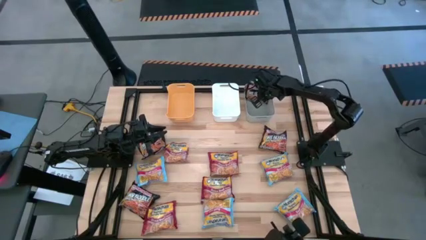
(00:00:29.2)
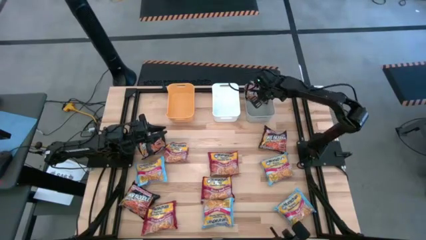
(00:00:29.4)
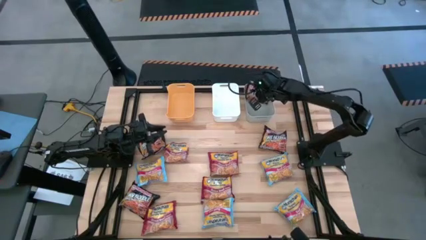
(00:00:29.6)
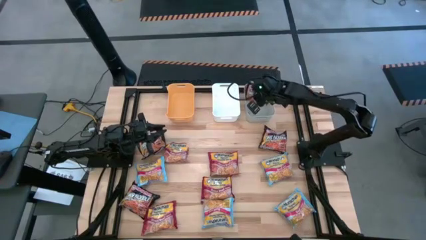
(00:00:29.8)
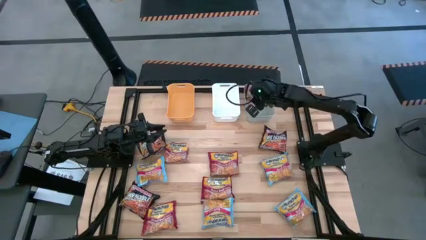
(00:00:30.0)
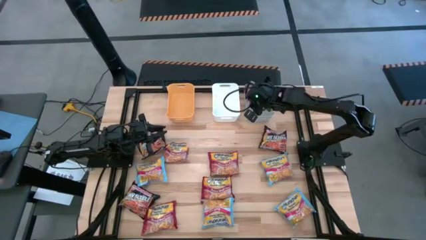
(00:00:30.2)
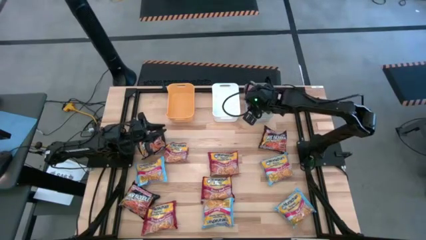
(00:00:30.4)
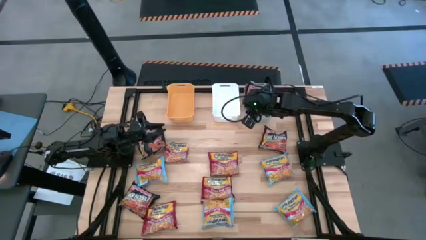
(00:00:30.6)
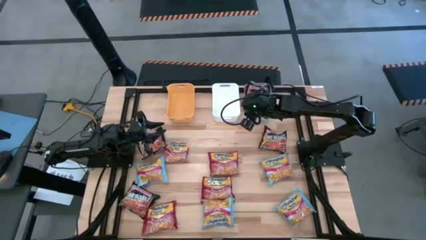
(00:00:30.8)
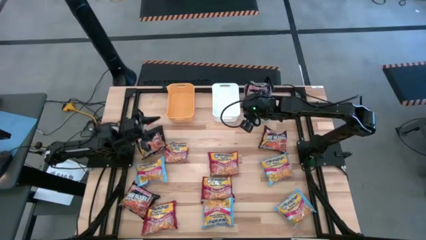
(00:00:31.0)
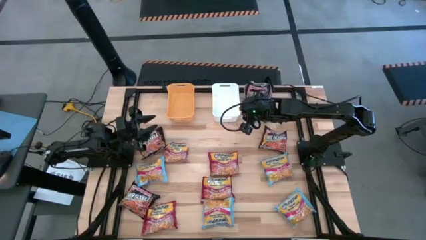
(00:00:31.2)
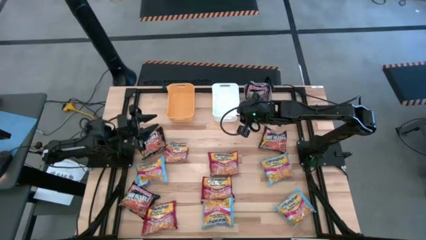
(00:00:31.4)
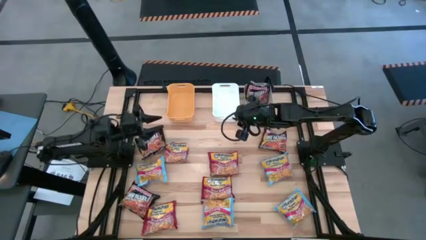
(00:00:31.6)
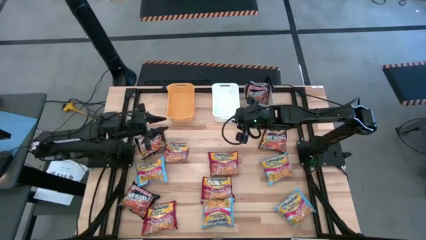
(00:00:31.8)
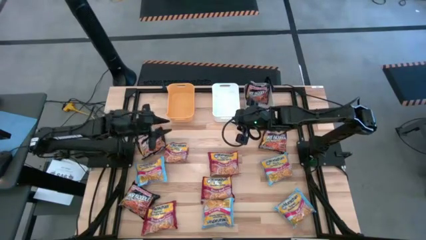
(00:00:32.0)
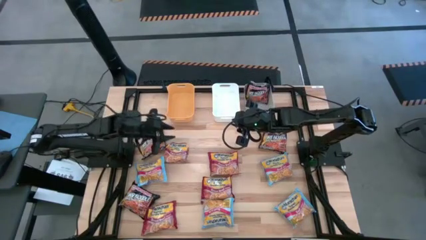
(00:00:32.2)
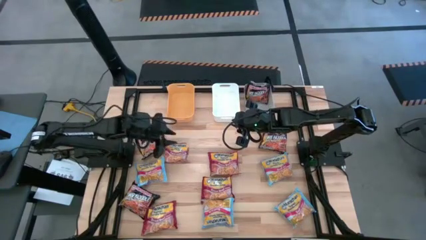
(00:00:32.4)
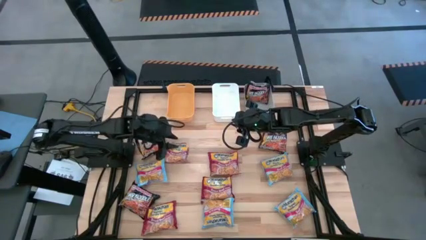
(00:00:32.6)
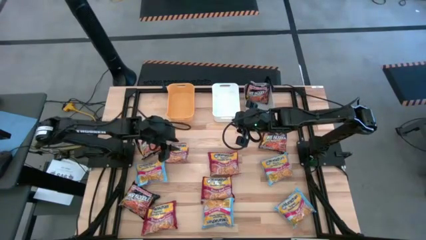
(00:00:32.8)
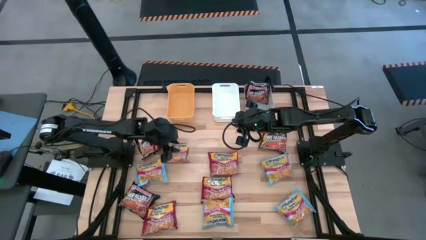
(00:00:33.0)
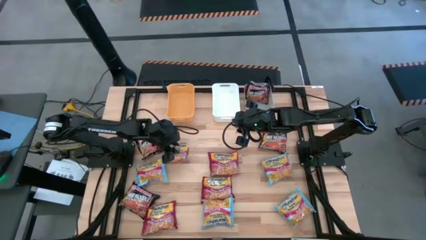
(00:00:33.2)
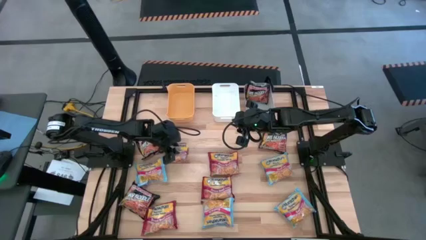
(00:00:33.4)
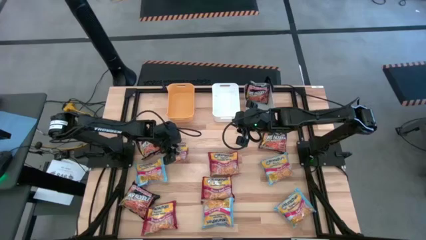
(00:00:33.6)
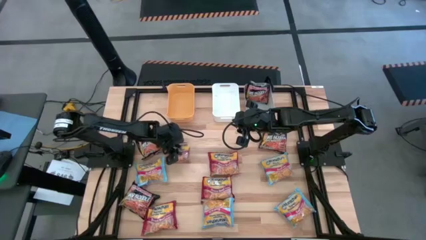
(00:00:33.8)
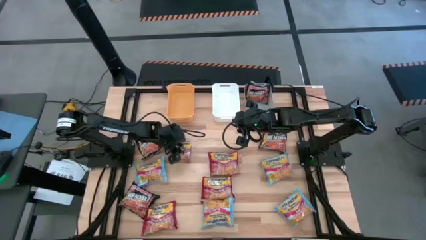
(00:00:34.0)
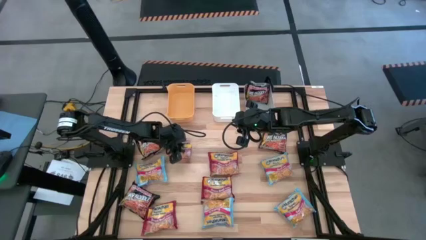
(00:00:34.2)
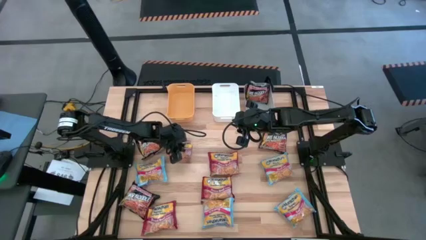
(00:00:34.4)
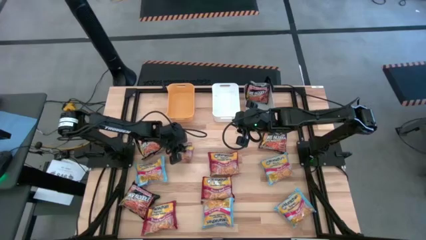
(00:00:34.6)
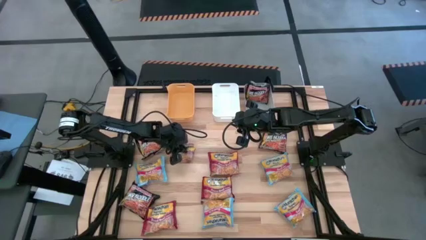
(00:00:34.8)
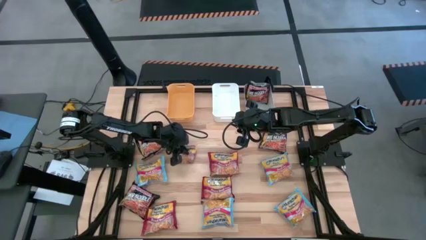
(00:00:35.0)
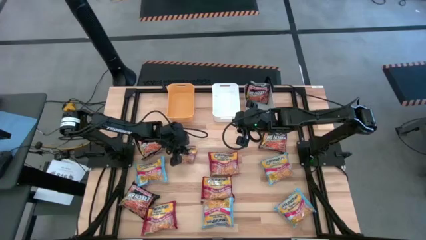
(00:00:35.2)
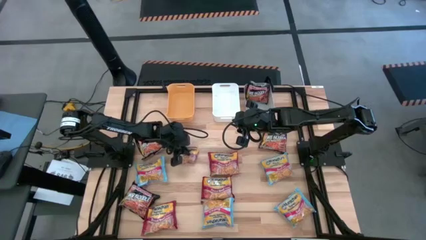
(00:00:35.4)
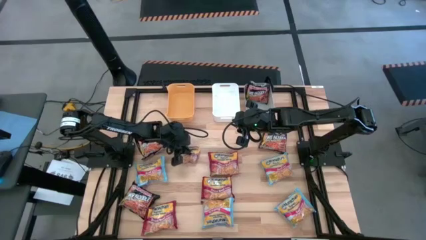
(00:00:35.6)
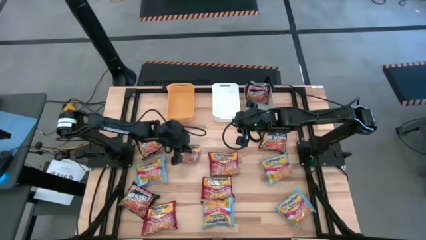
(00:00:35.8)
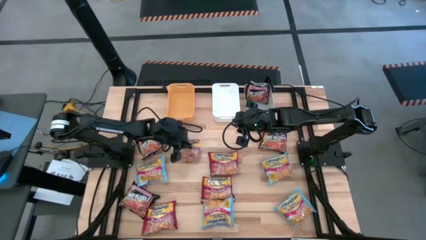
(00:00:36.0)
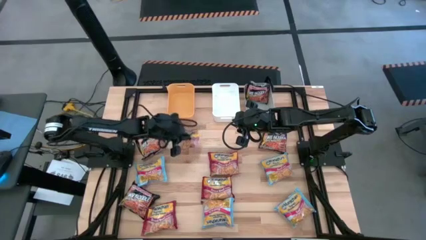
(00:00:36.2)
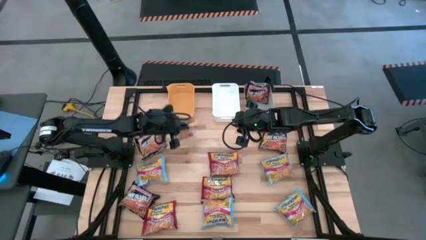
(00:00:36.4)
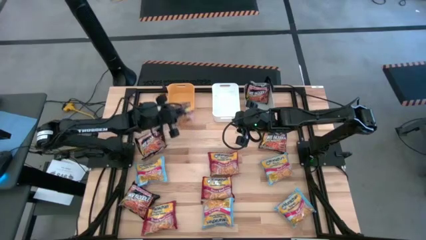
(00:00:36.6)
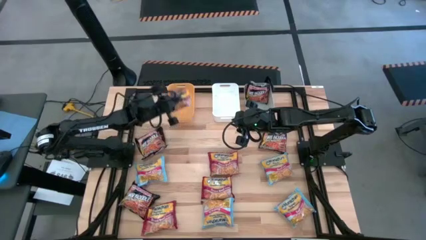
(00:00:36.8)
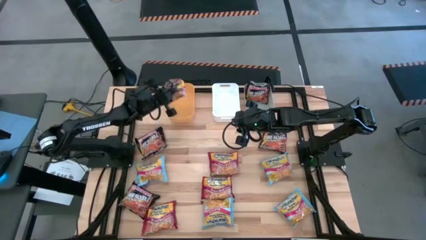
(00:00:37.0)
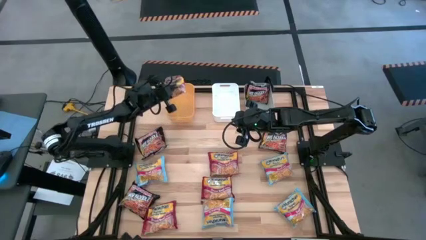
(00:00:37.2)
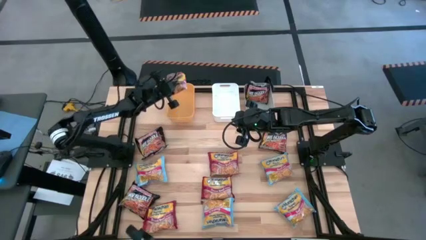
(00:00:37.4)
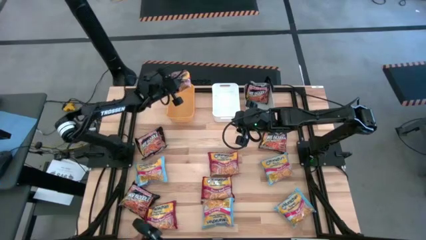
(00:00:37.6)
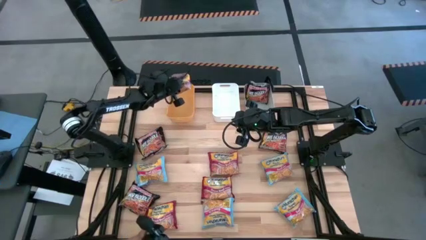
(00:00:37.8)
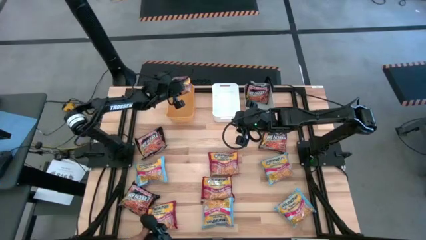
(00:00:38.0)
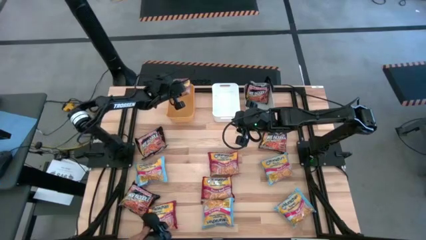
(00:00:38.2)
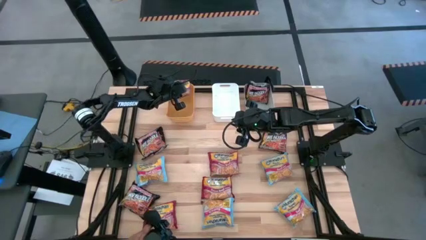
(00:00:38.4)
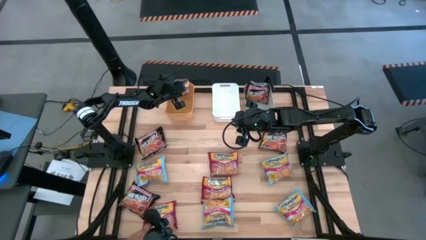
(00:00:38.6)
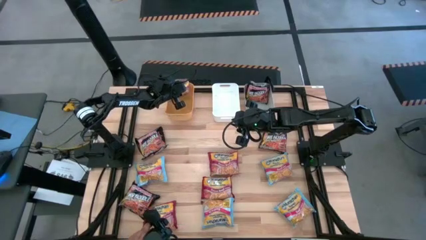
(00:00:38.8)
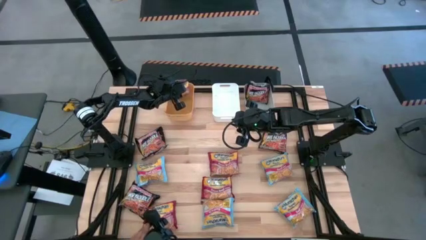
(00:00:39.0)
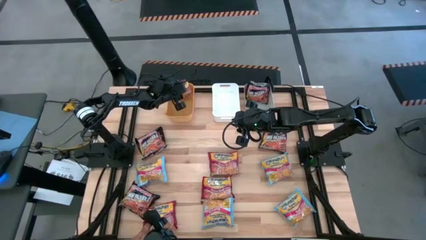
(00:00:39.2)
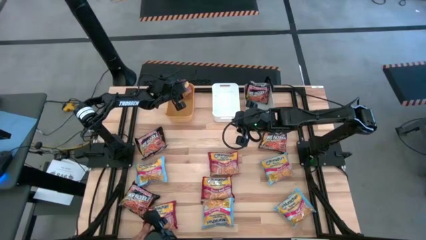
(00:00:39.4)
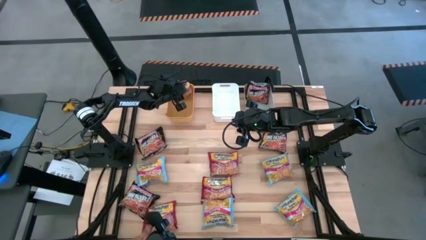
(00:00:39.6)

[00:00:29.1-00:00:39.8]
Task: Sort Maruchan noodles
Put the red noodle pack into the yellow bin
